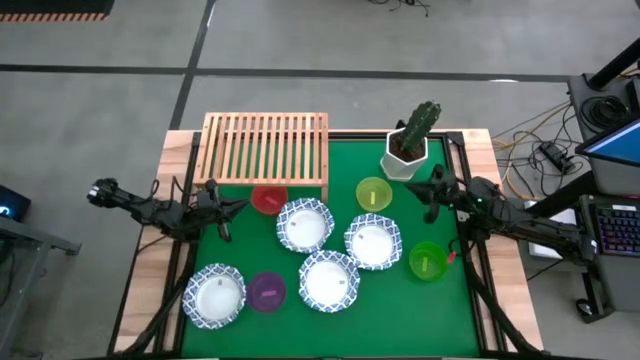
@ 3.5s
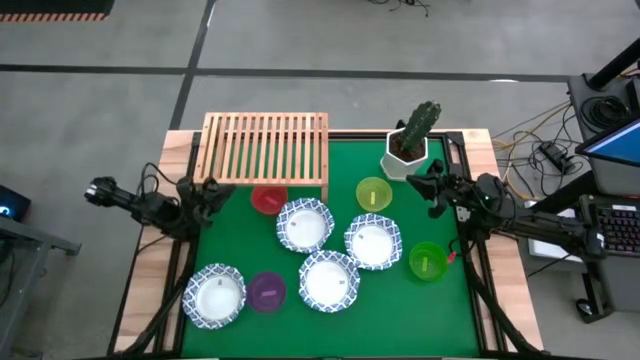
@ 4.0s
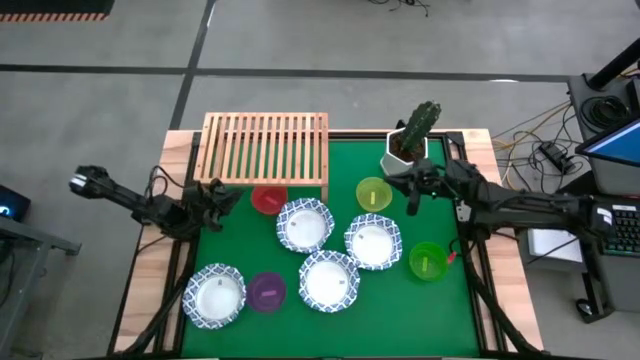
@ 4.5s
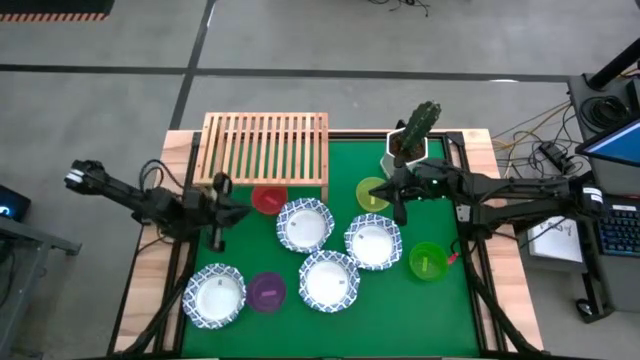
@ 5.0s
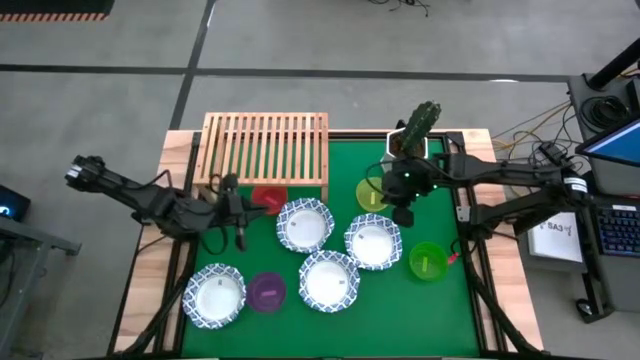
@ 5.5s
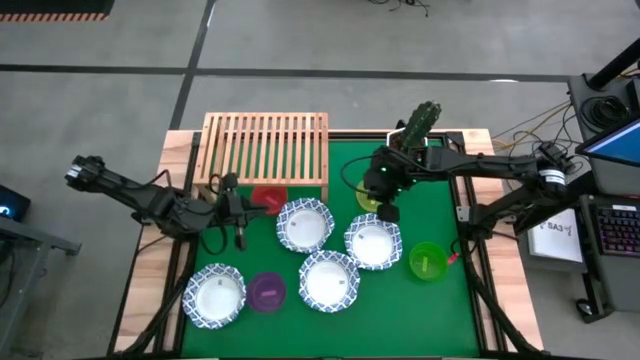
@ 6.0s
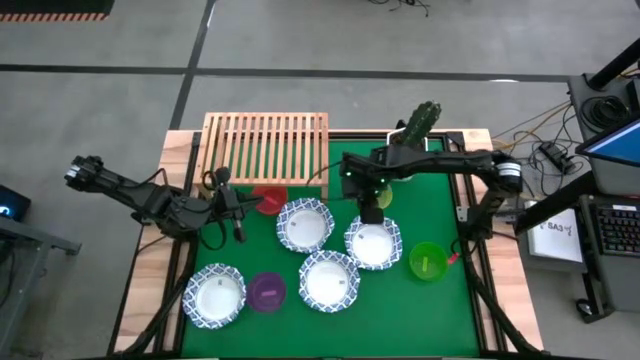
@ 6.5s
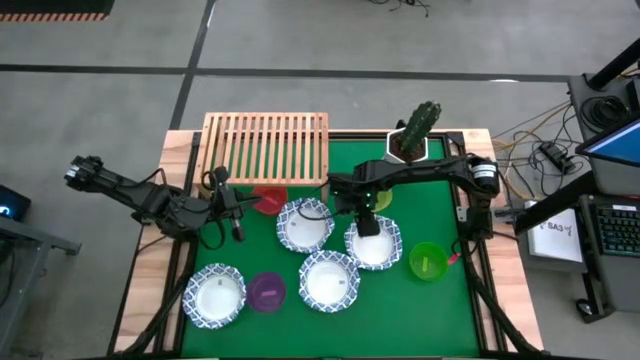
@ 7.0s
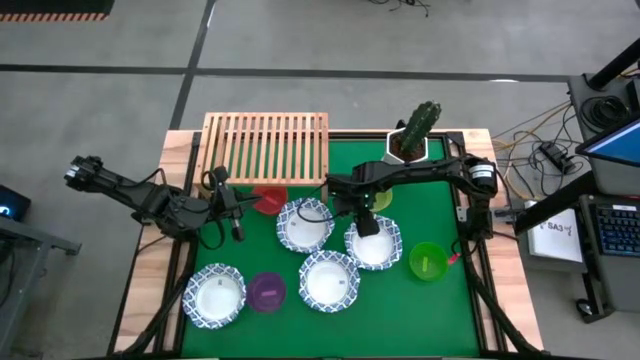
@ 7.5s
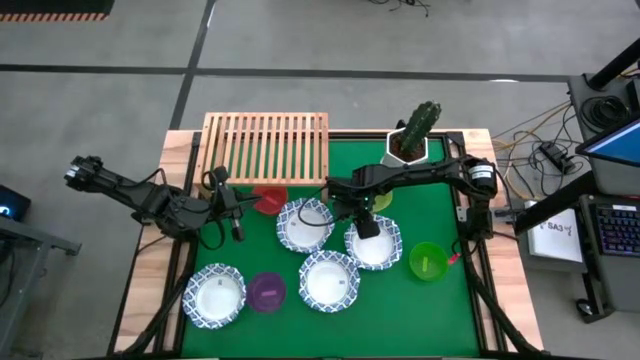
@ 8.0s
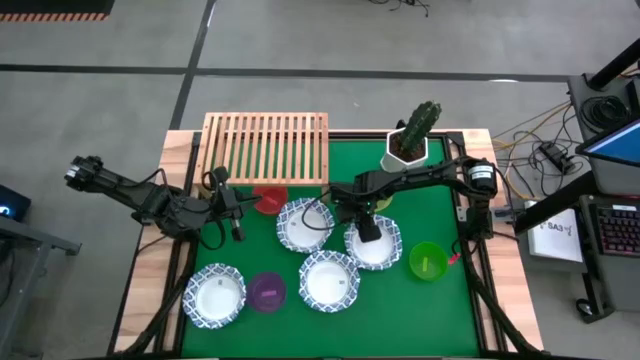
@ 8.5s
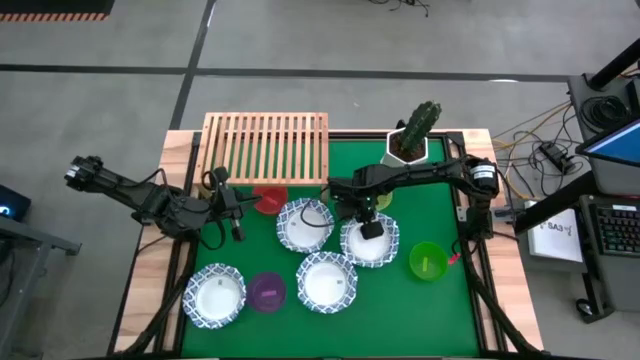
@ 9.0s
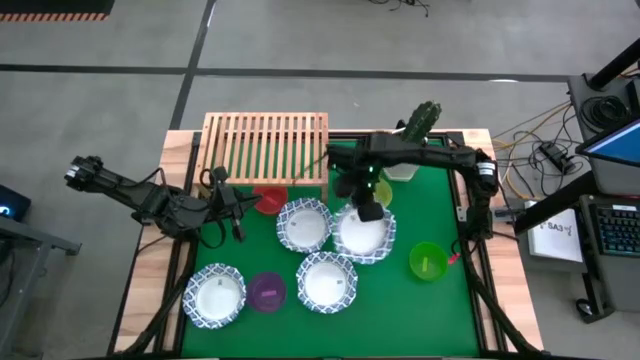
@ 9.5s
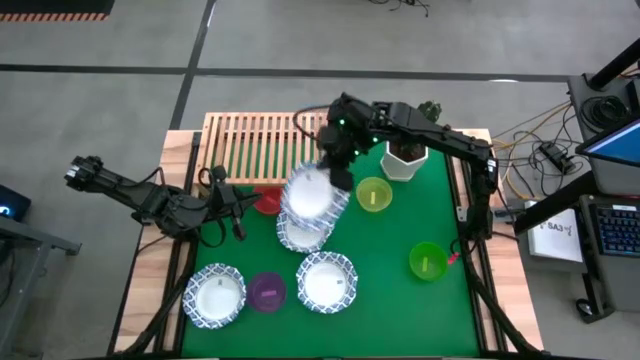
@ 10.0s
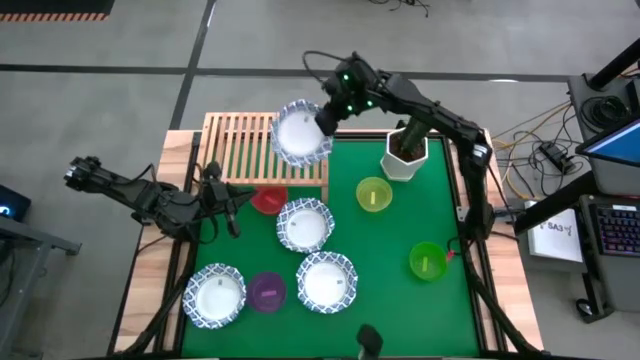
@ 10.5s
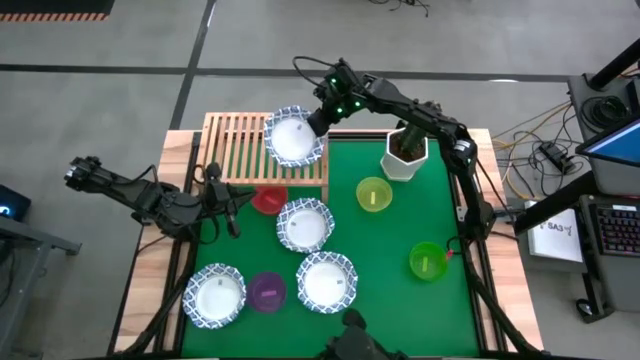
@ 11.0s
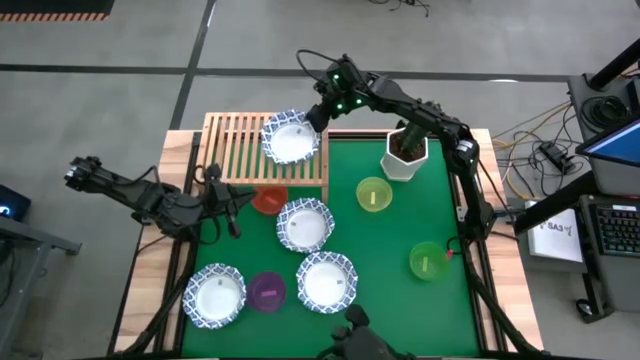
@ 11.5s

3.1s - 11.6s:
Task: Place and stack plates onto a shelf
Put the top right white and blue plate on the shelf

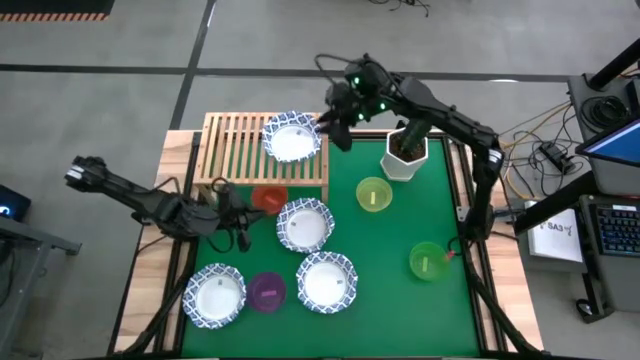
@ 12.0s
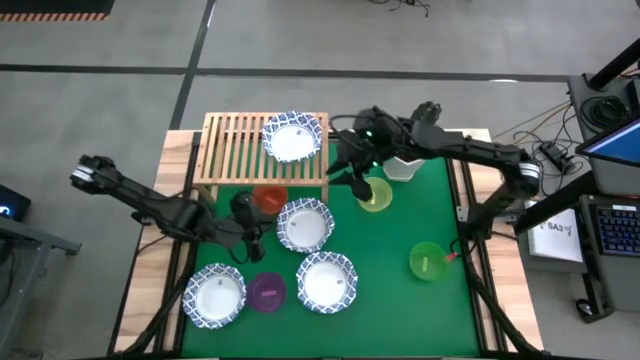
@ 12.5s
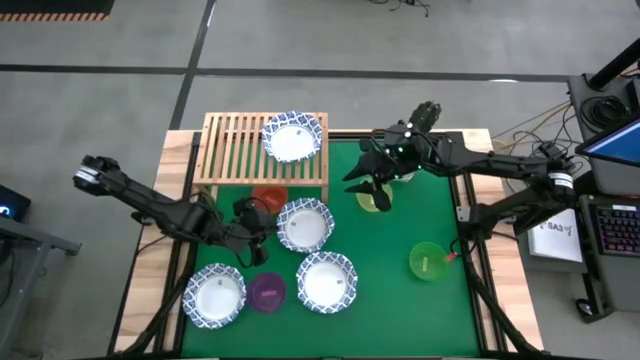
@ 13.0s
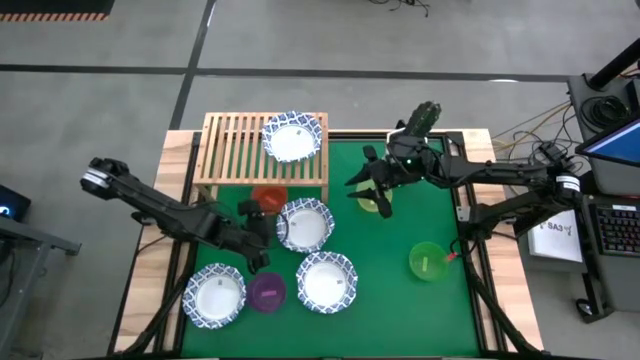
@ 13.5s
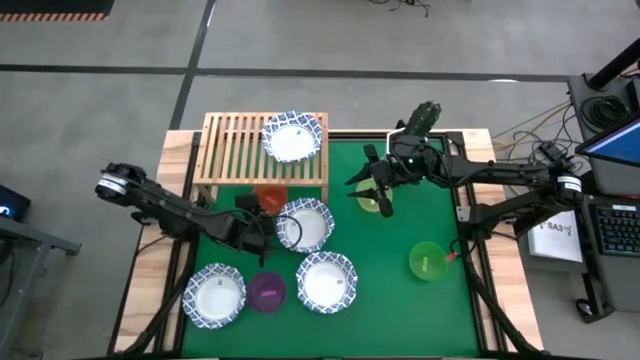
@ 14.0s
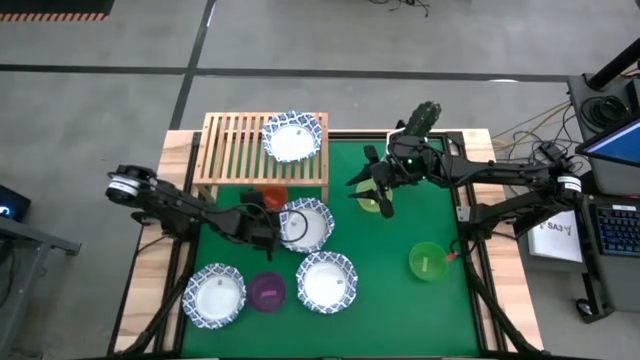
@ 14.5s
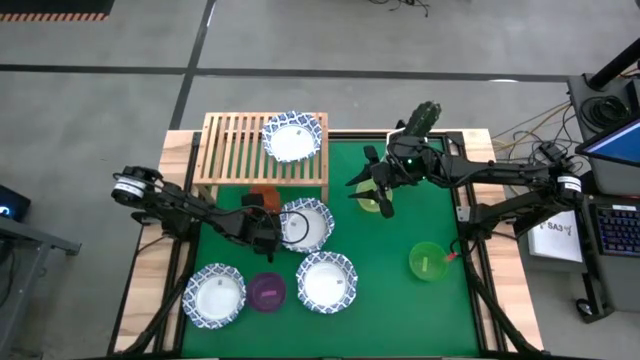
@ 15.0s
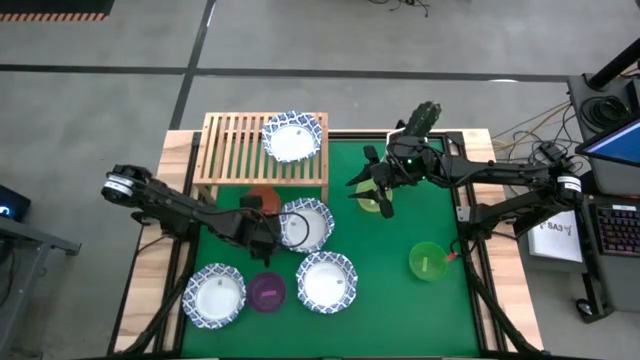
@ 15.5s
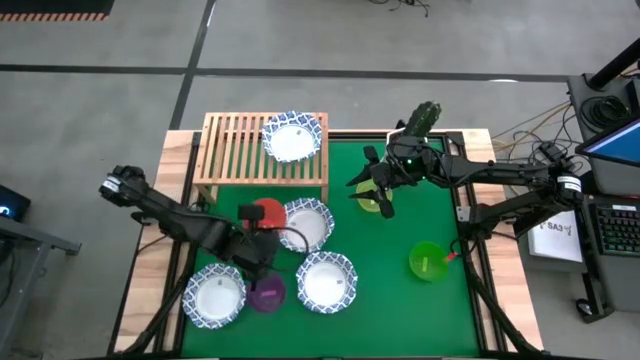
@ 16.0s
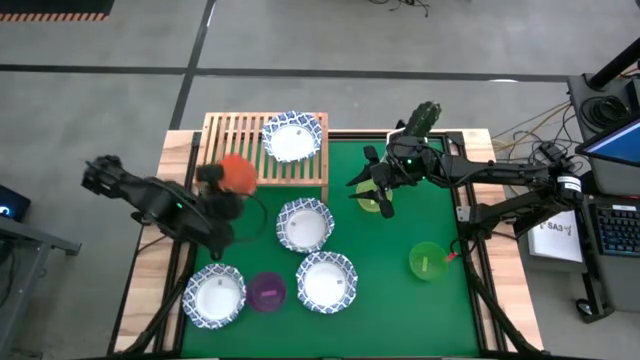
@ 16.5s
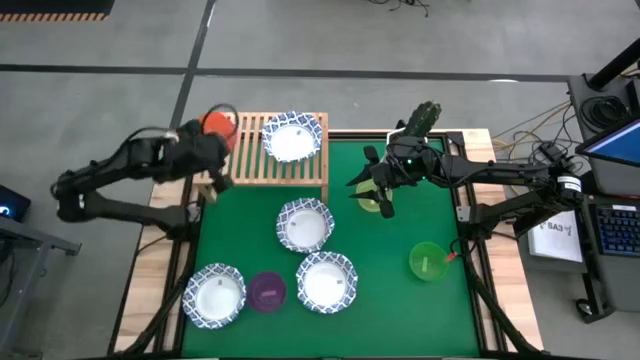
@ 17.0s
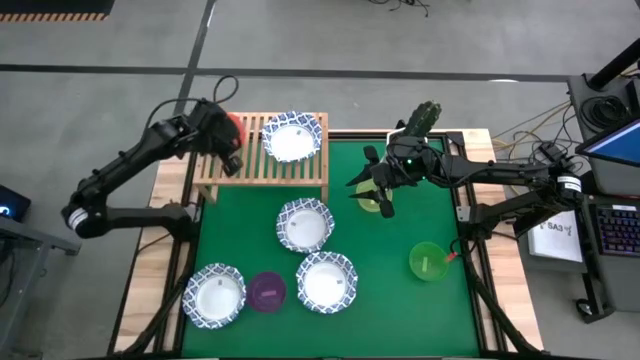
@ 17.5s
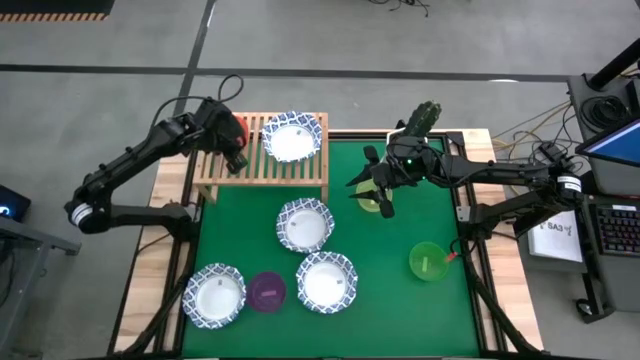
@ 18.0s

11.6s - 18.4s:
Put the orange bowl on the shelf

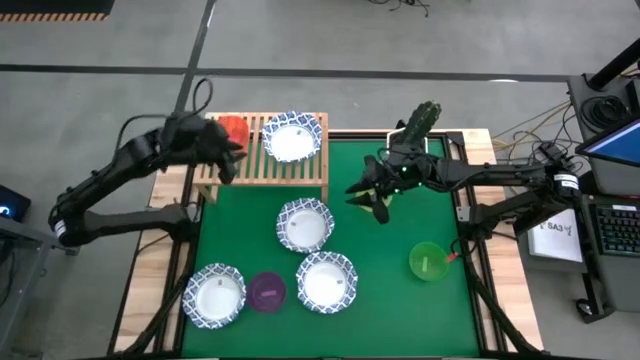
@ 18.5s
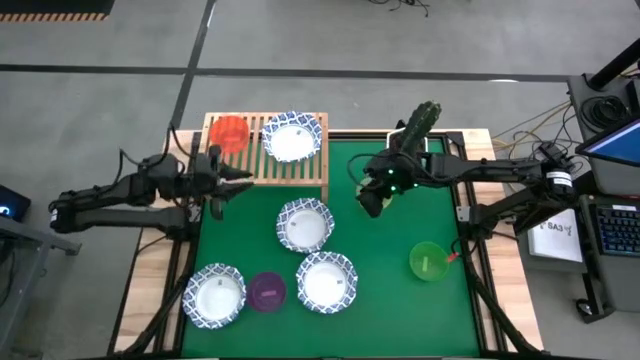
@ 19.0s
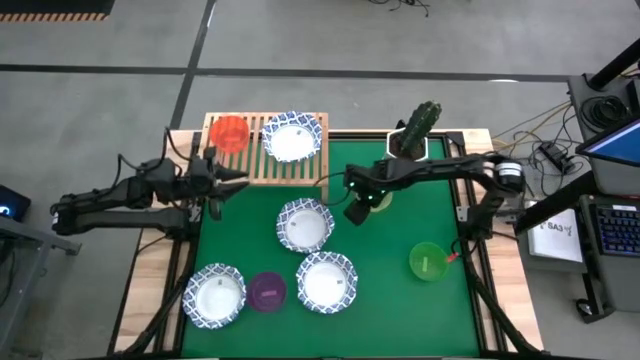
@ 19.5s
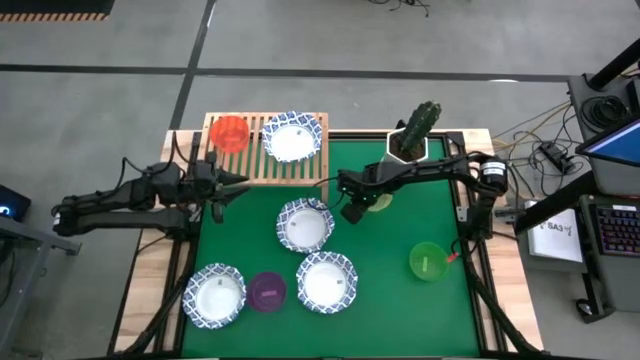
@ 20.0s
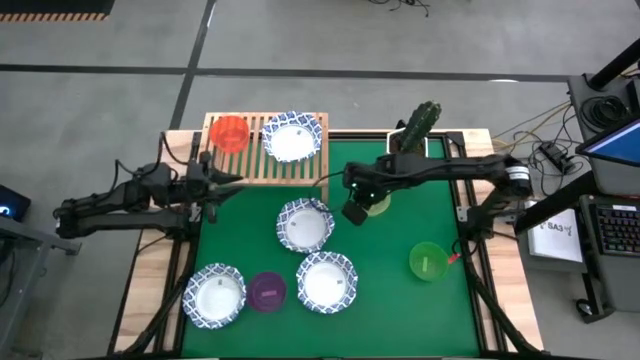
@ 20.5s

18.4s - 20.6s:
Stack the yellow bowl on top of the orange bowl on the shelf

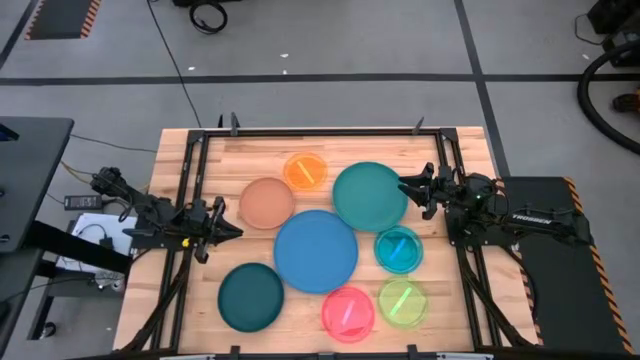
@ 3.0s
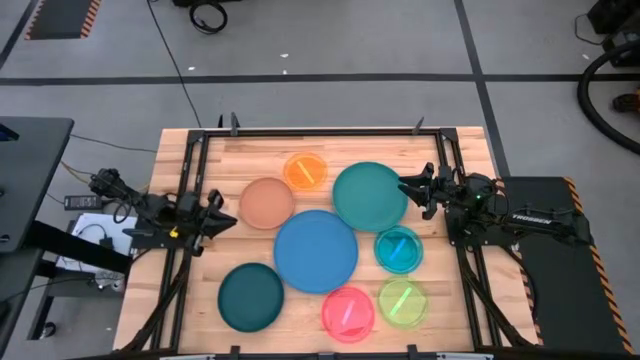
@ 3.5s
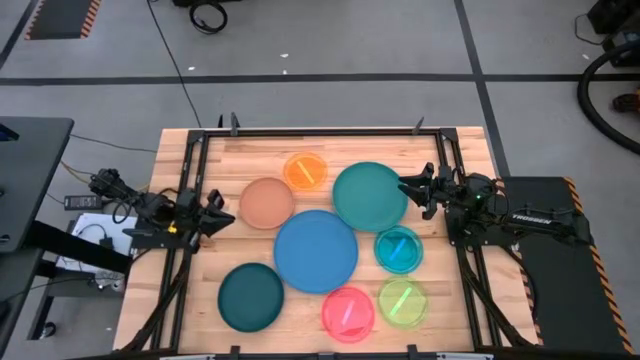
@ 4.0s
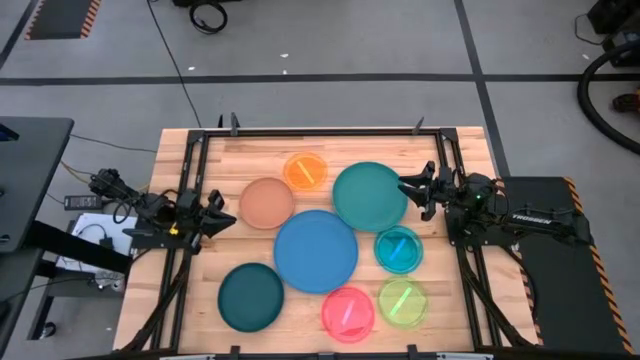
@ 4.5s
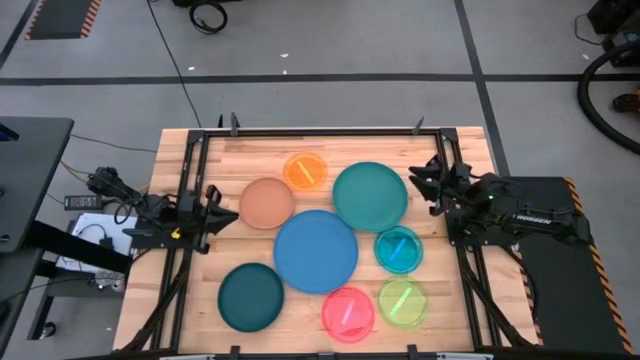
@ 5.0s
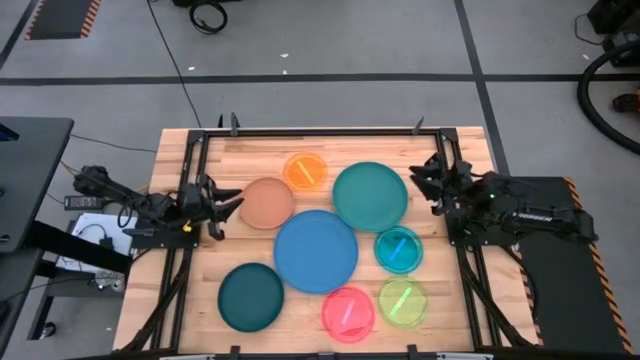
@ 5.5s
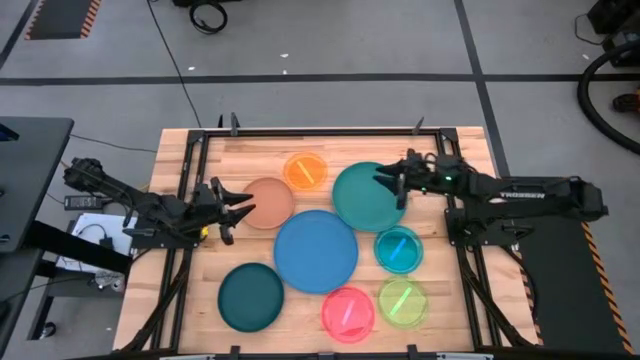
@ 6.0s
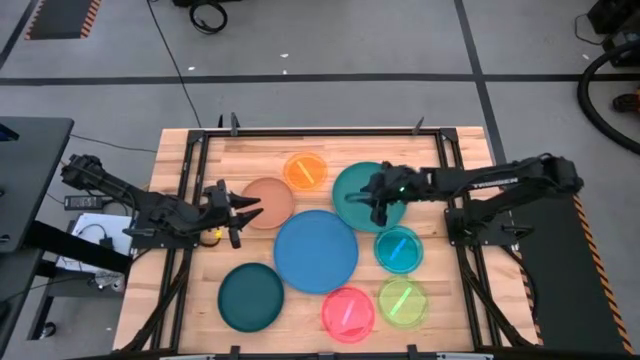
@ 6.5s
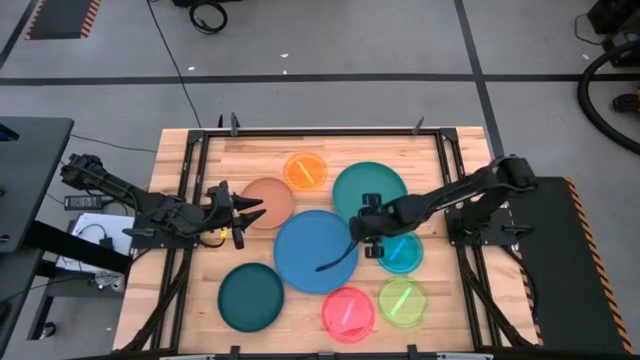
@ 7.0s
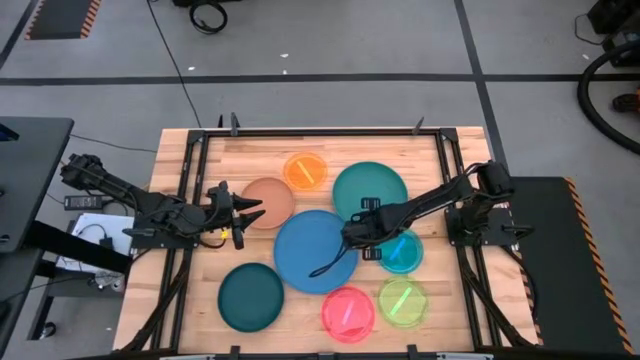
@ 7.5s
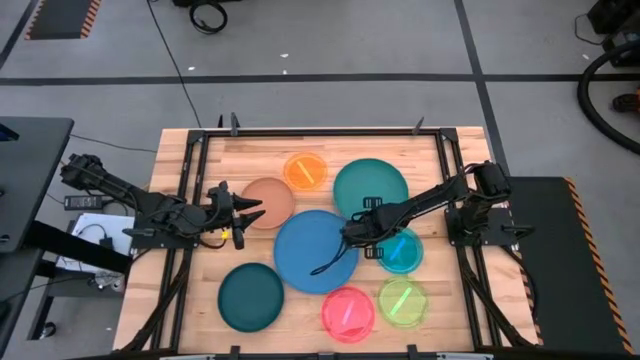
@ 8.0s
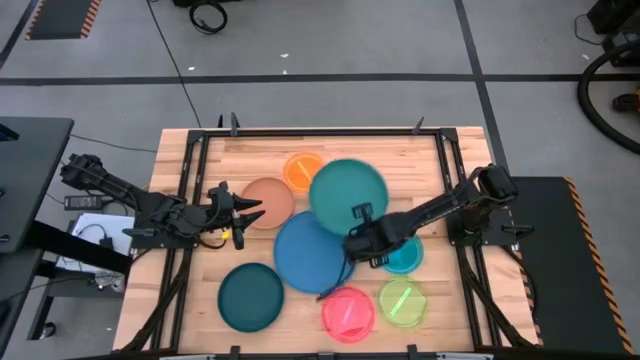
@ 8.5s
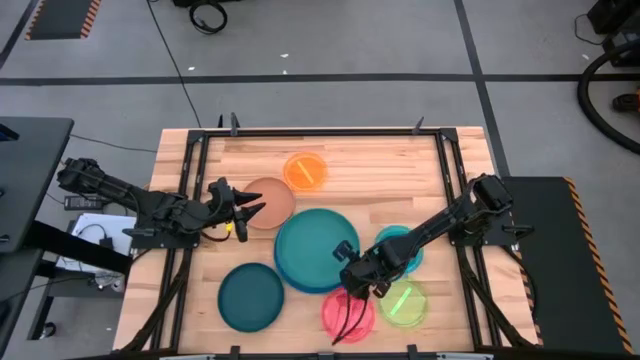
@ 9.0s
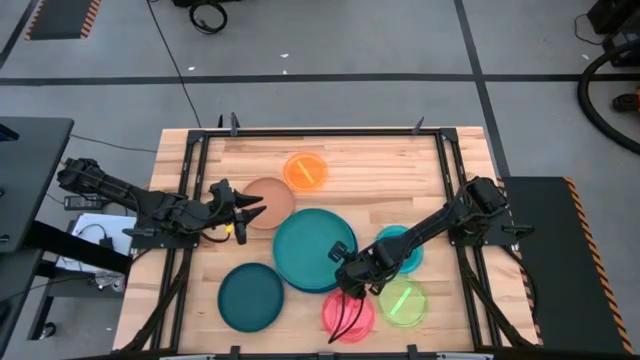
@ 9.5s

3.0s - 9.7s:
Task: Stack plastic plates
Stack the green plate on top of the blue plate
